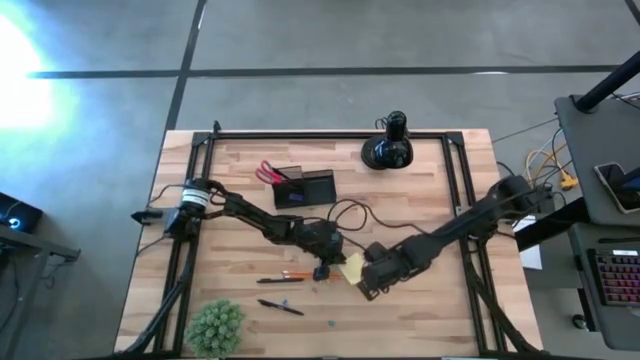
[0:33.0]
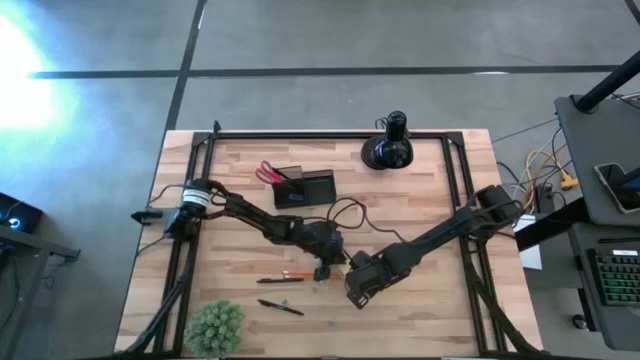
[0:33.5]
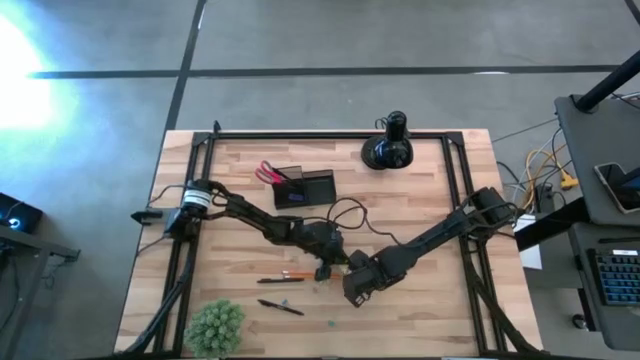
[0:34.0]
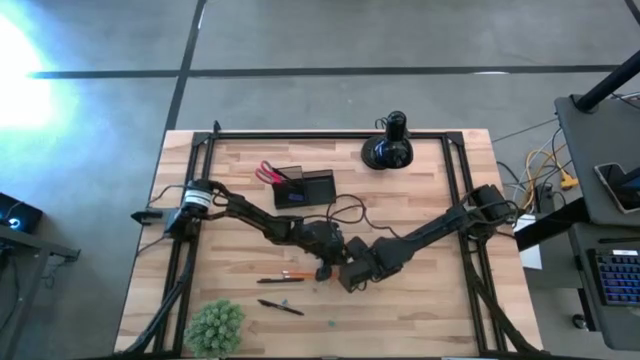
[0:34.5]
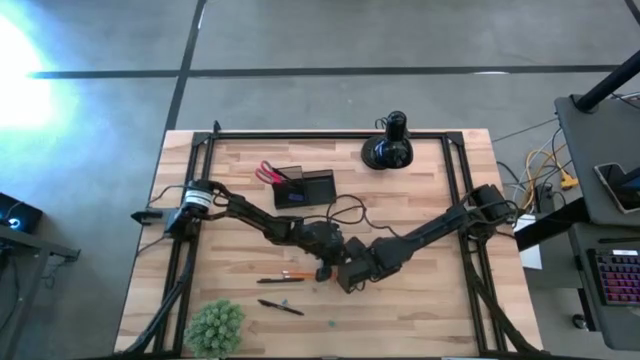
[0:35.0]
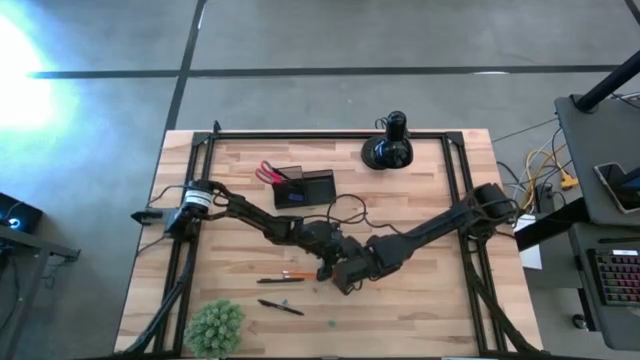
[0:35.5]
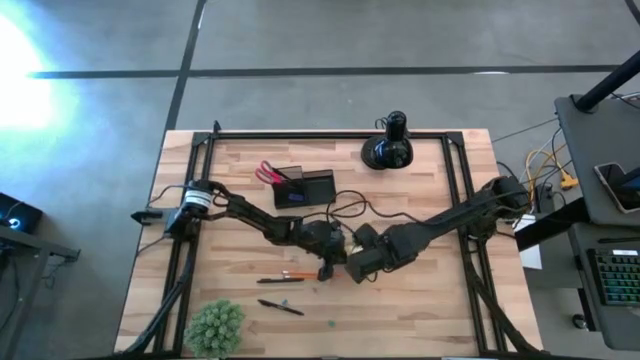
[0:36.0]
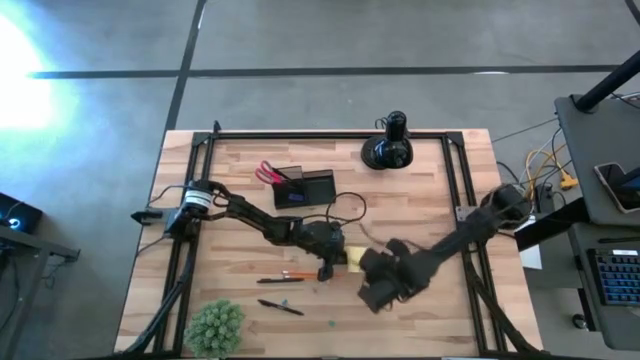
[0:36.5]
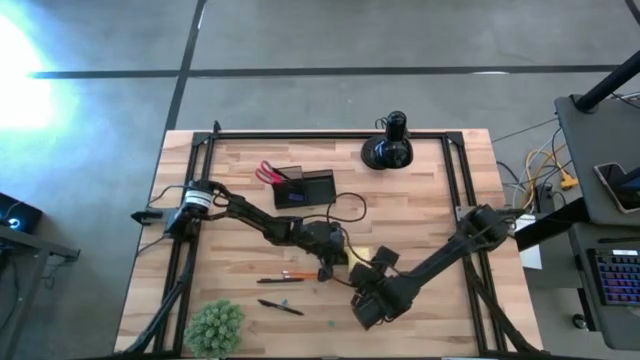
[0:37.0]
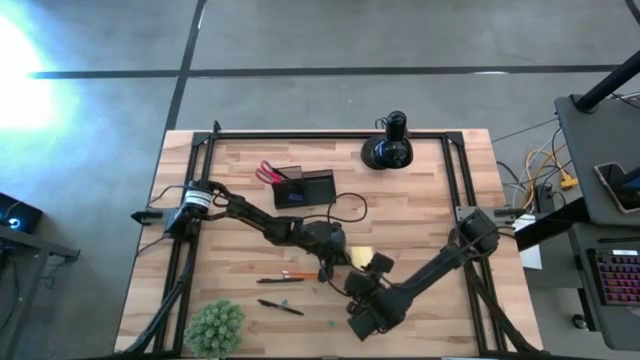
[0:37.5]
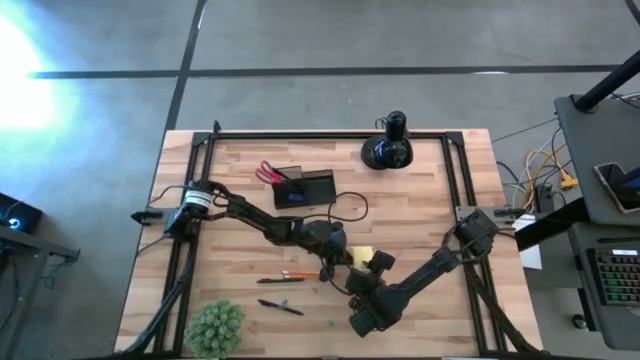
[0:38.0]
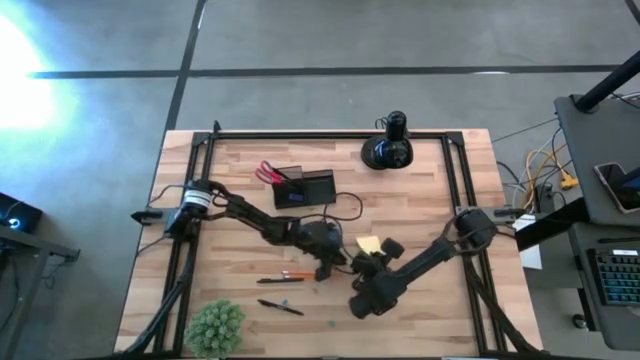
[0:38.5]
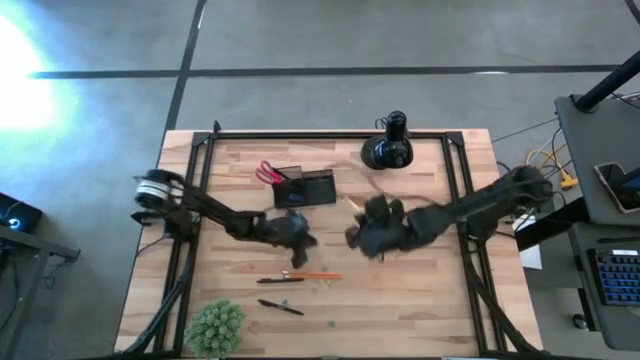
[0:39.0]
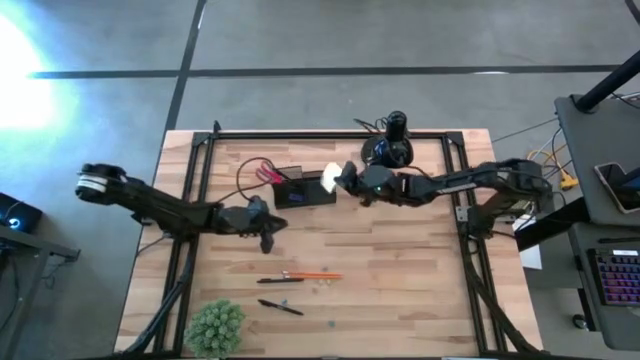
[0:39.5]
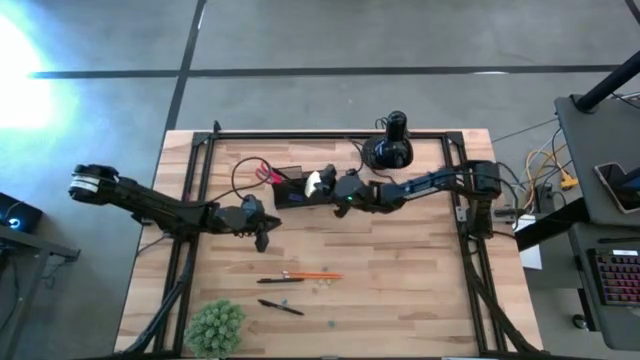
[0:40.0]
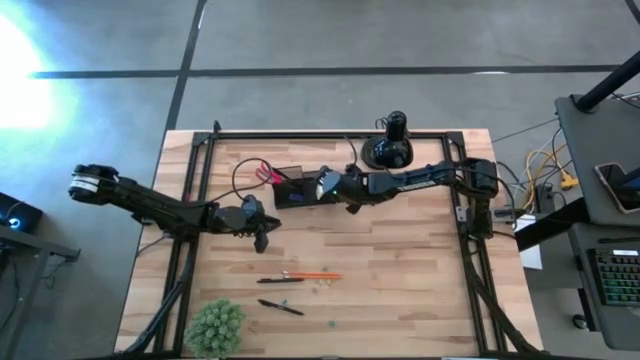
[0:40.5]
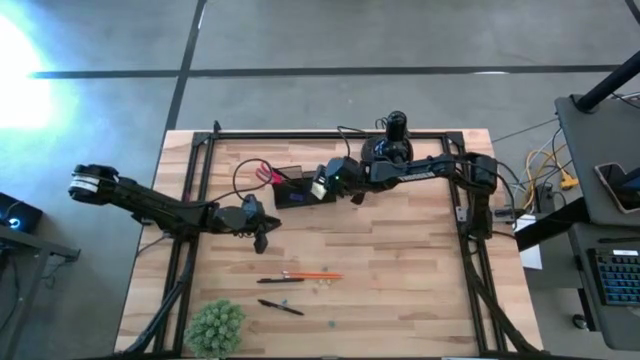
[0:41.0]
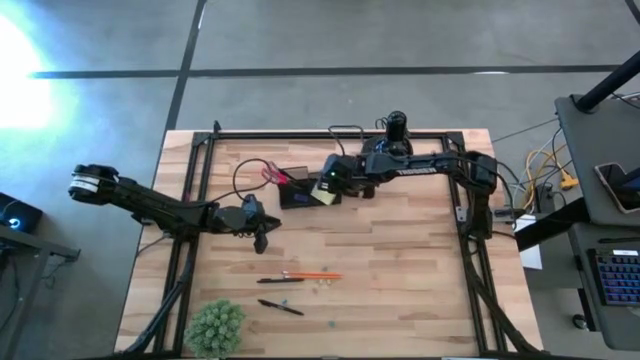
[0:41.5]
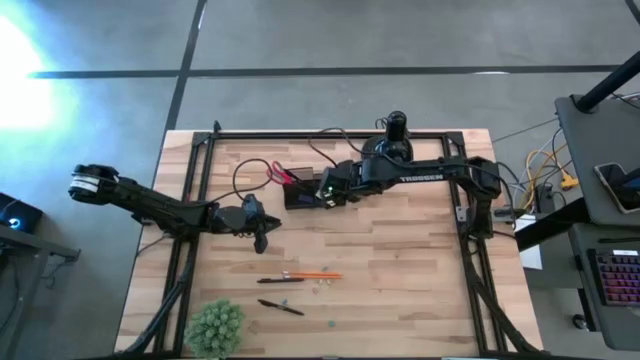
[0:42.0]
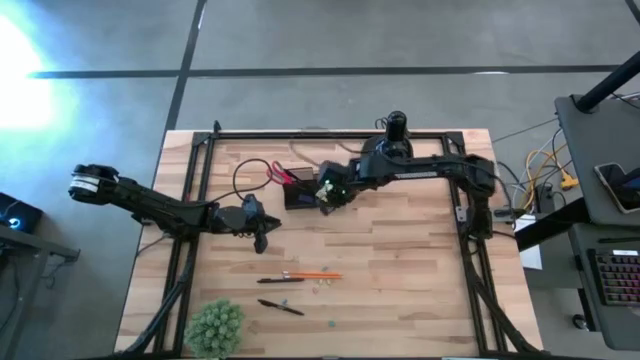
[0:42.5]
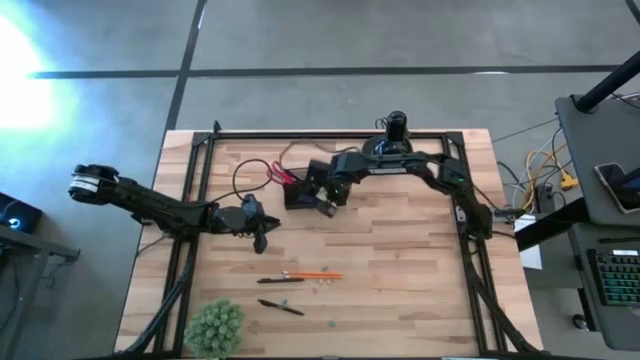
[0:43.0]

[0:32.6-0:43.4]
Task: Pick and place office supplies into organizer
Put the sticky notes into the black organizer

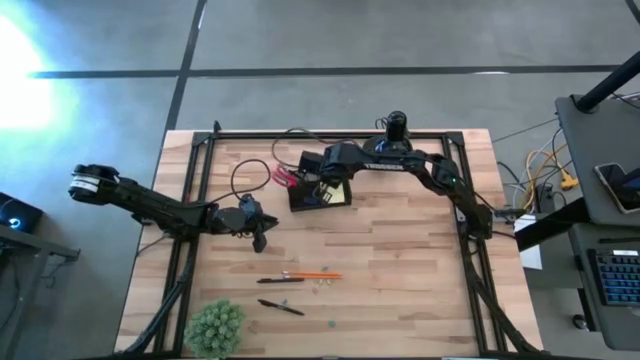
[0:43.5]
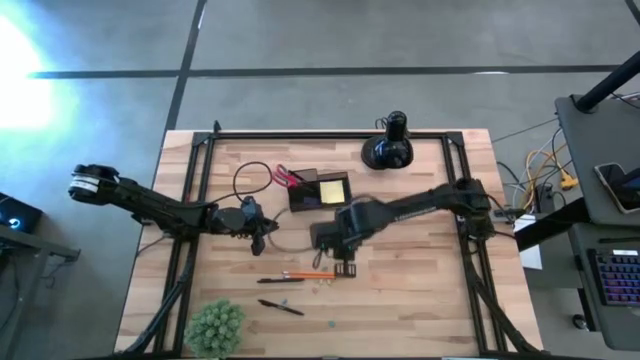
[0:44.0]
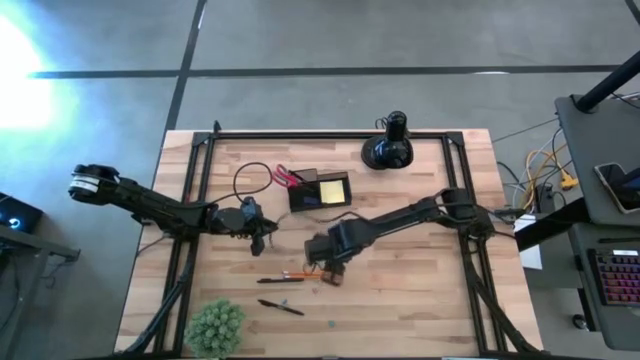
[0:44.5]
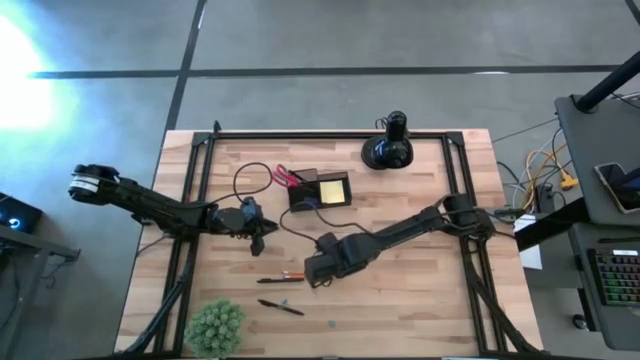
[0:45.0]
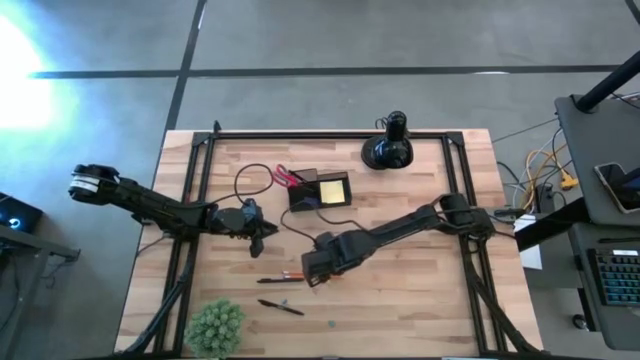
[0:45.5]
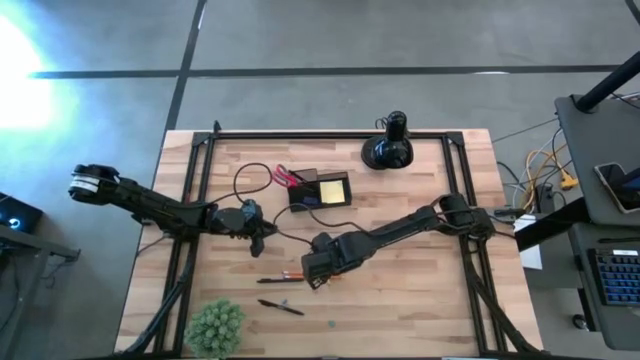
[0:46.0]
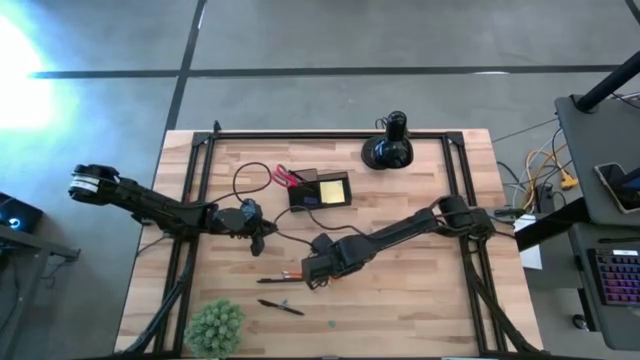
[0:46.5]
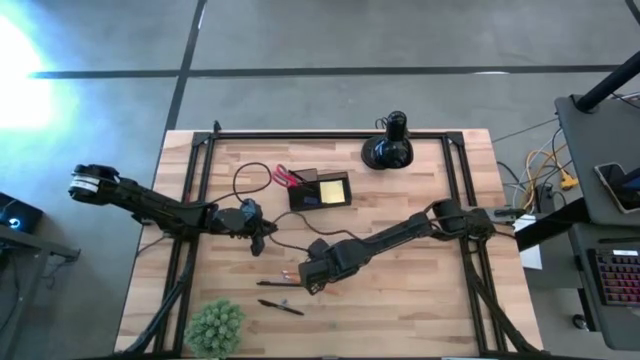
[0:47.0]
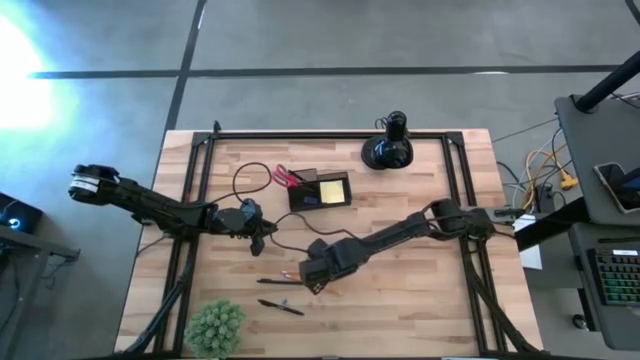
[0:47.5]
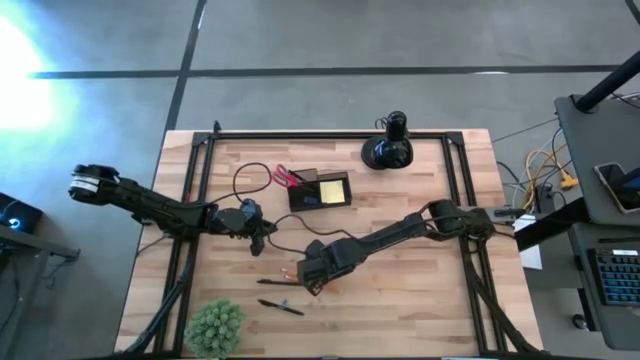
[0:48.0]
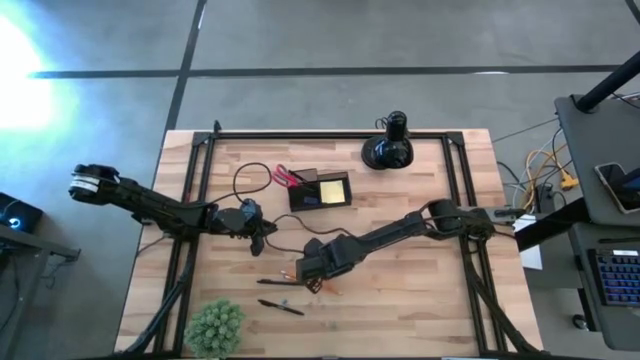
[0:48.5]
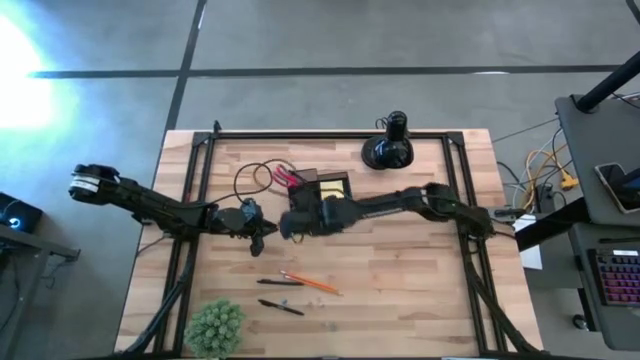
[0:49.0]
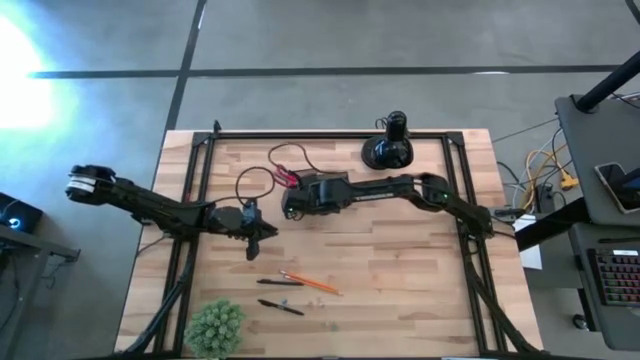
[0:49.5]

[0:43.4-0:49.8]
Put the top blue clip into the black organizer

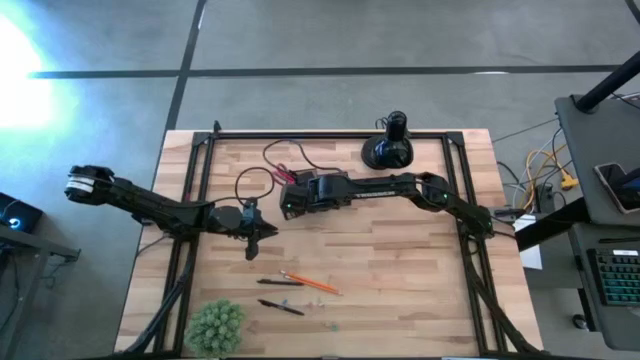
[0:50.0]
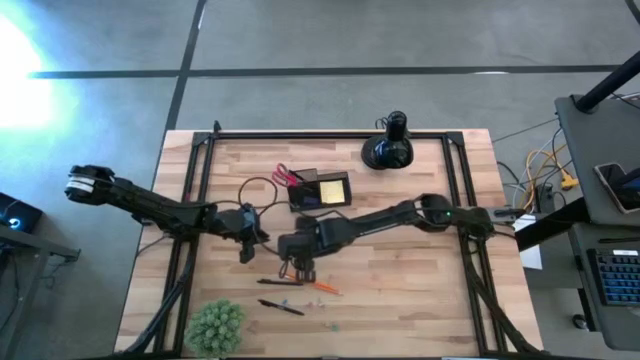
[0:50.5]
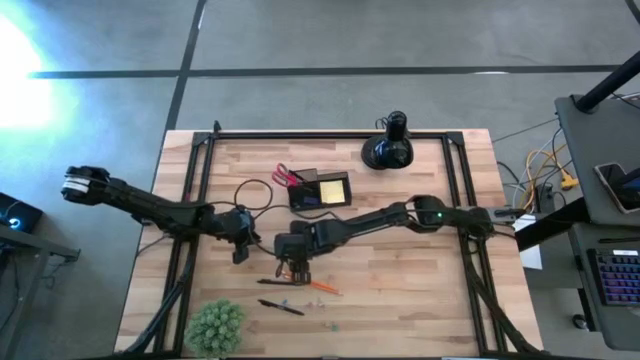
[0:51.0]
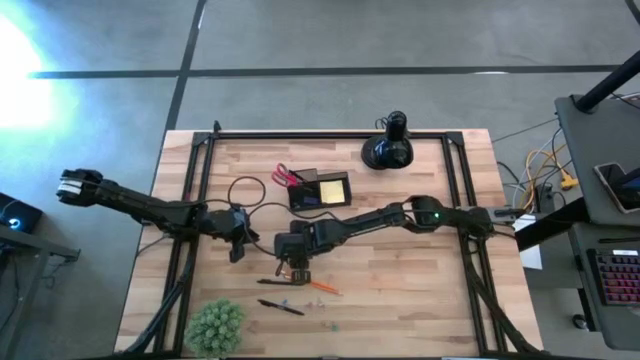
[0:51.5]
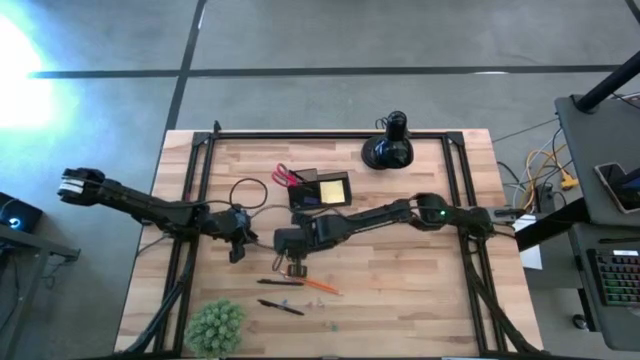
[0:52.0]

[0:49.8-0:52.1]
Put the top yellow clip into the black organizer

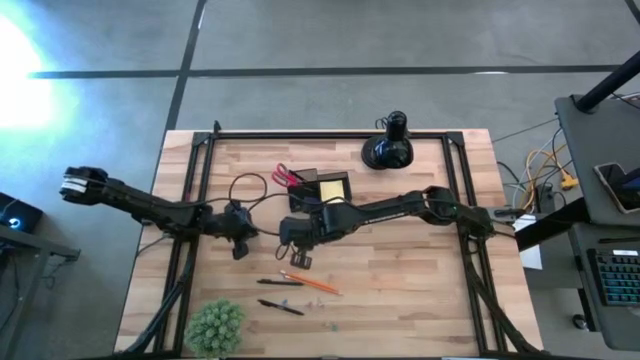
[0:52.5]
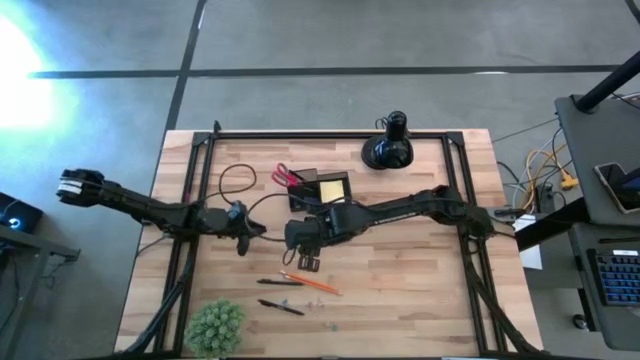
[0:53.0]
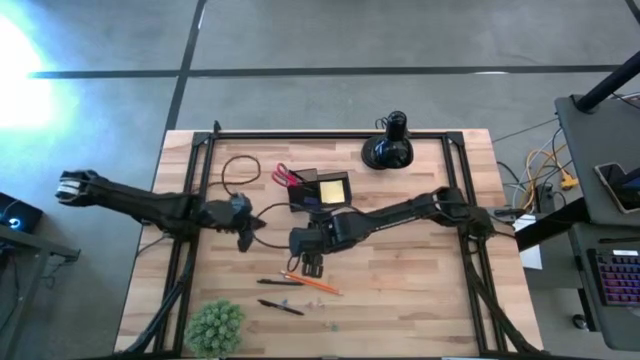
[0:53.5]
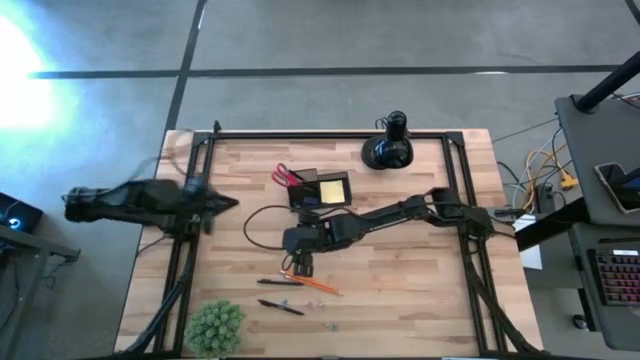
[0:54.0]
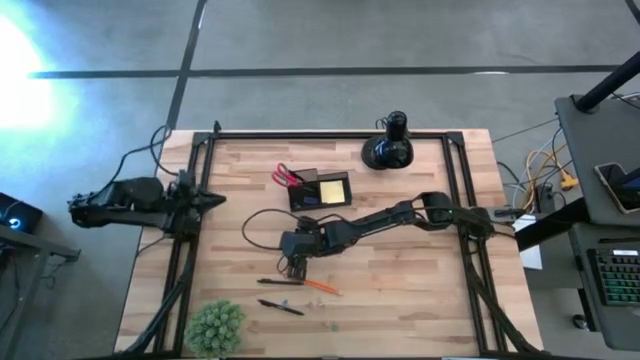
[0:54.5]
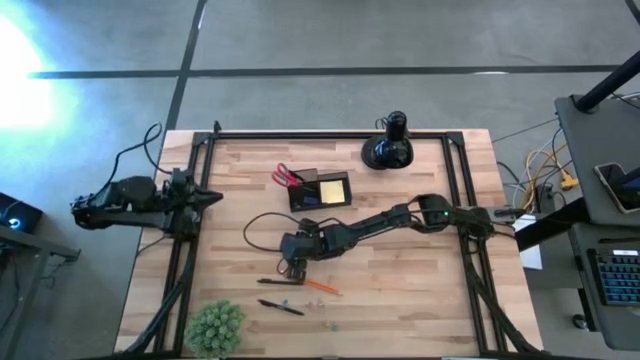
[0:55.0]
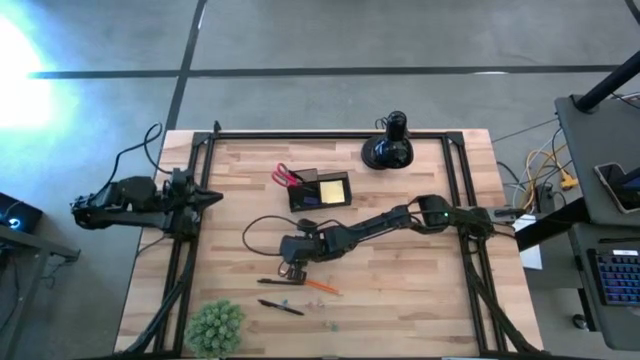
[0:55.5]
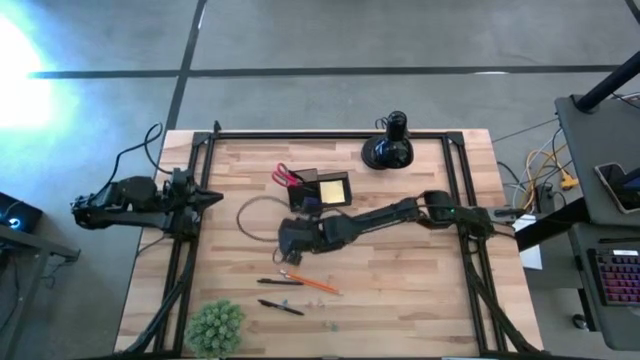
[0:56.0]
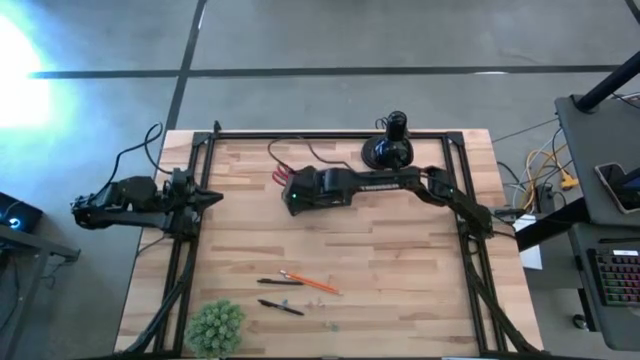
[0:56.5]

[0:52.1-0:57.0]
Put the top yellow clip into the black organizer
